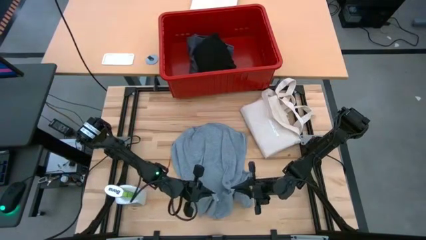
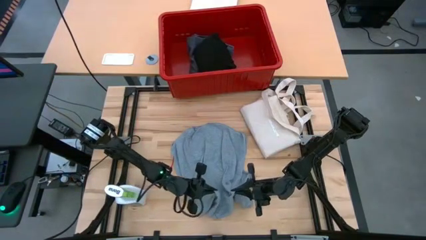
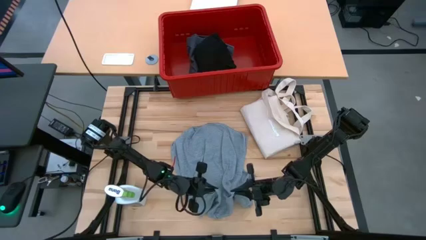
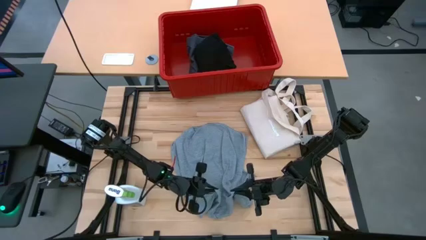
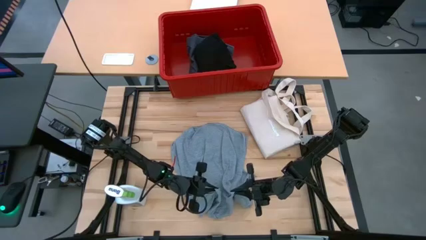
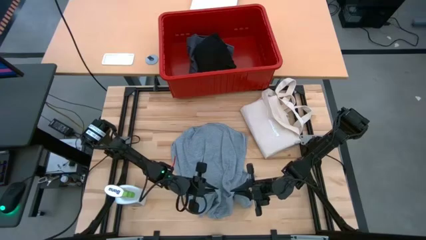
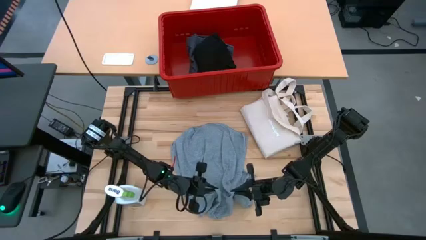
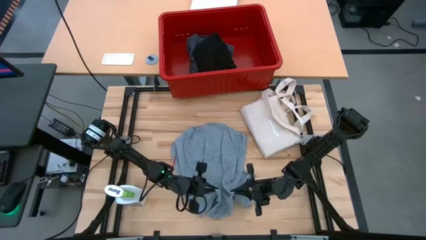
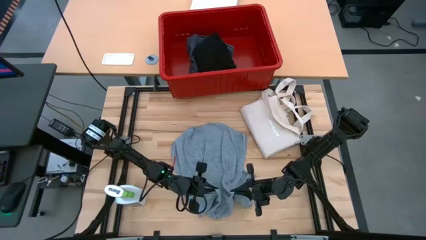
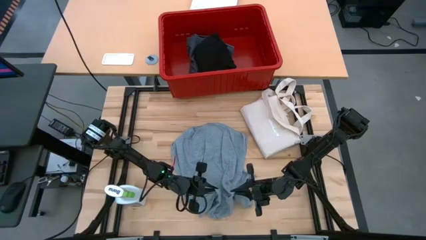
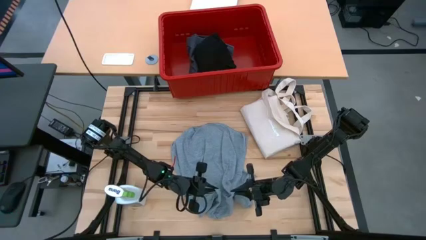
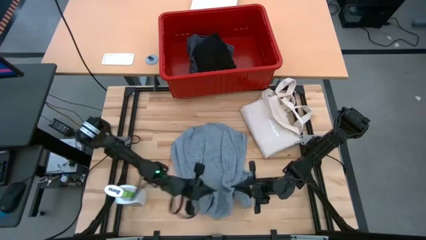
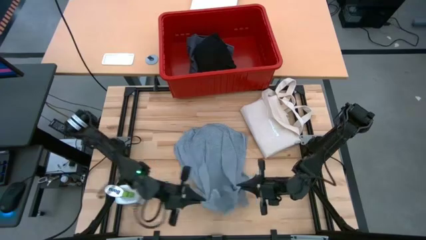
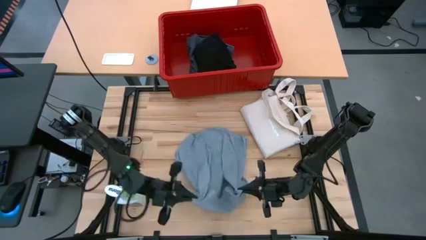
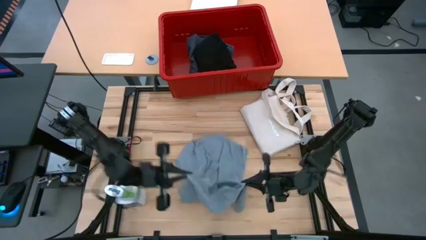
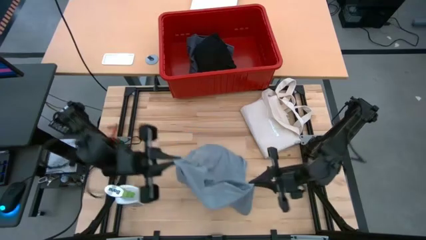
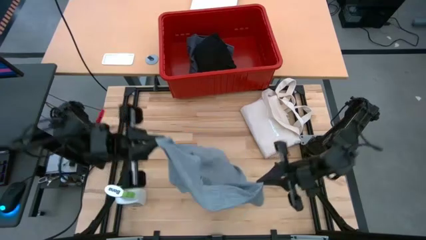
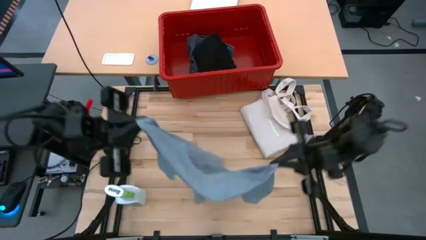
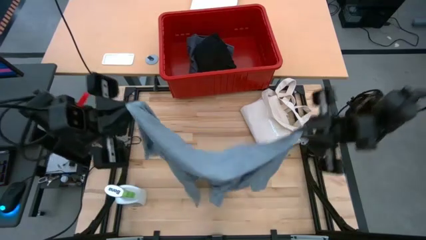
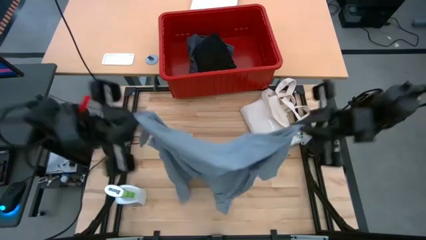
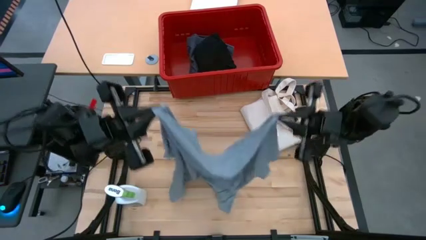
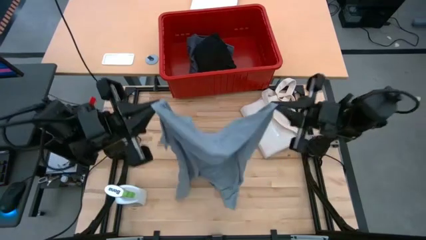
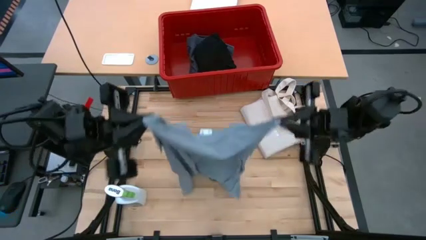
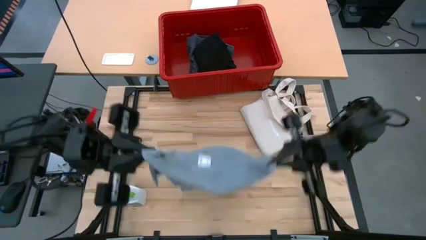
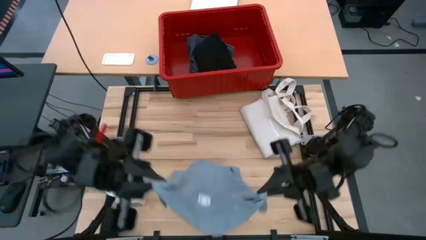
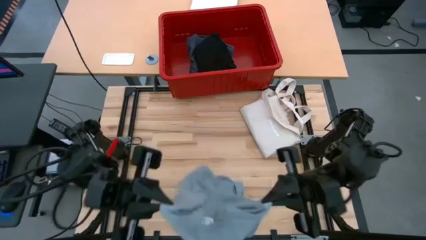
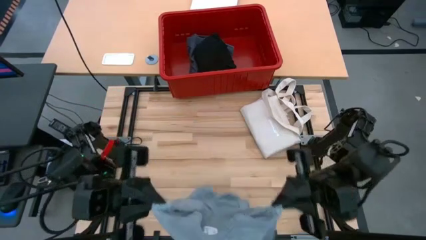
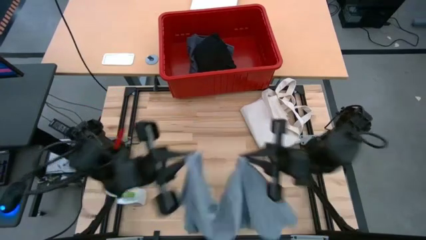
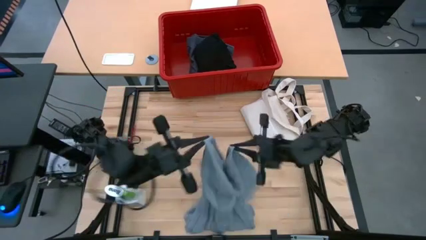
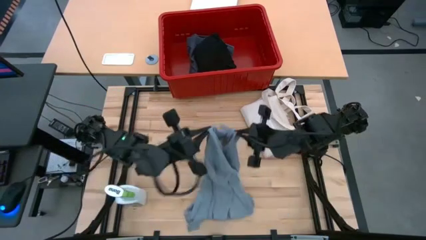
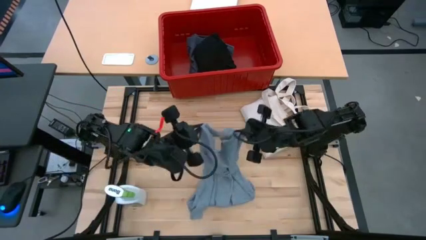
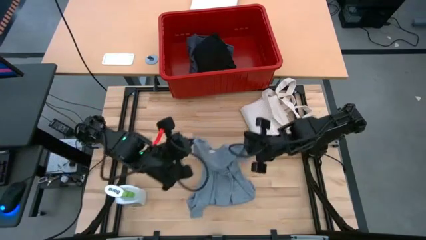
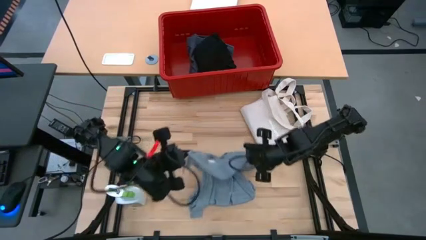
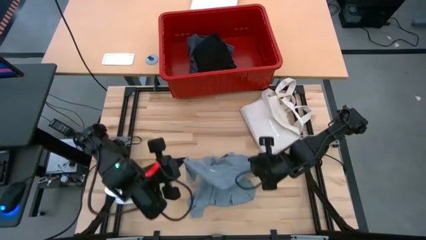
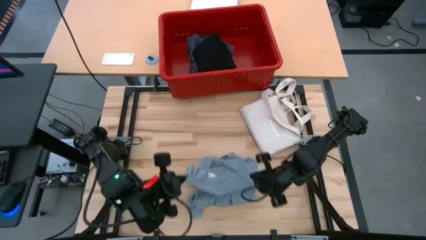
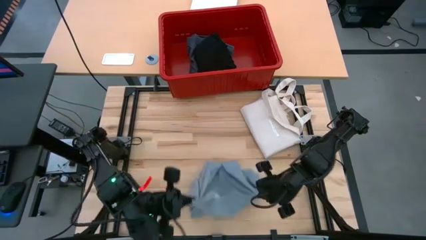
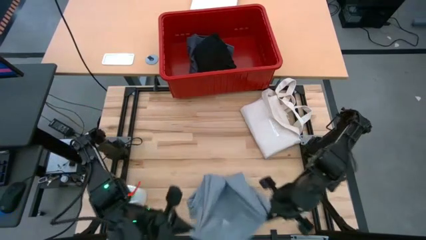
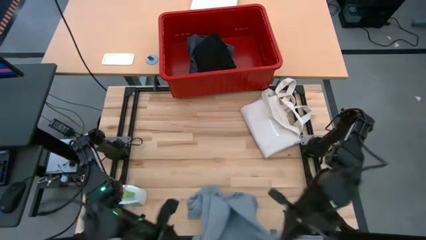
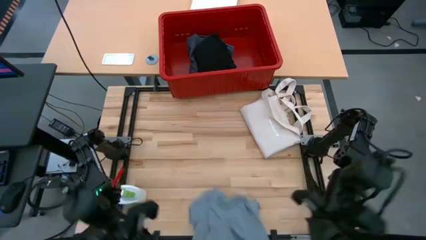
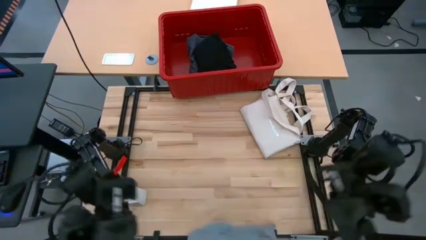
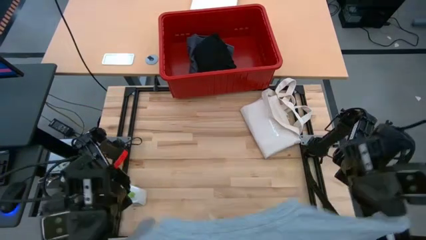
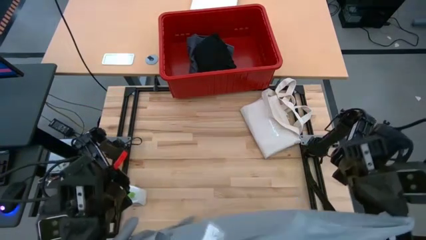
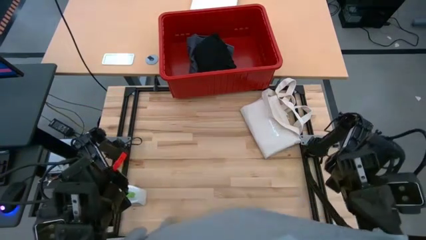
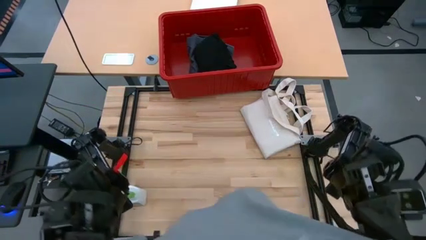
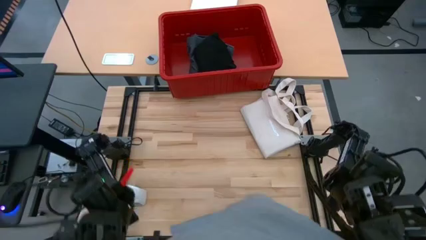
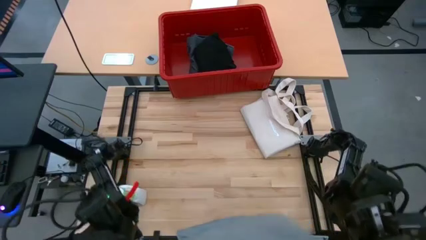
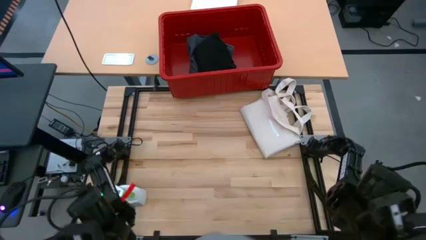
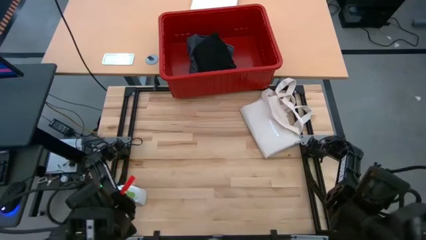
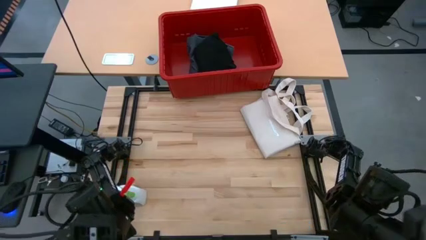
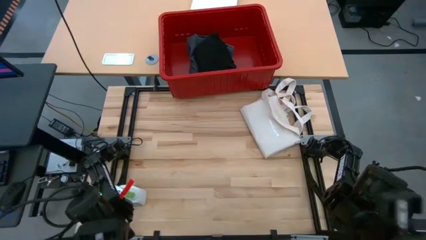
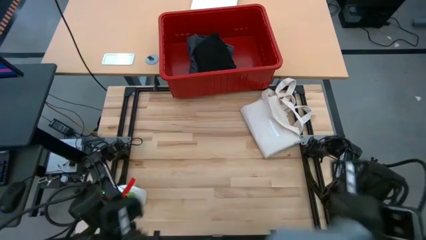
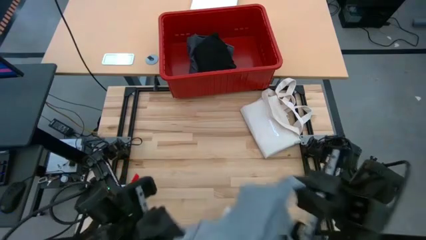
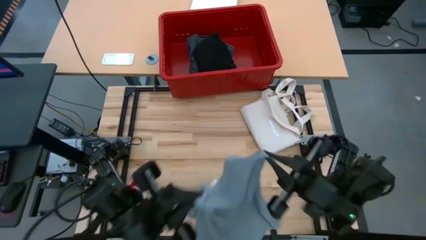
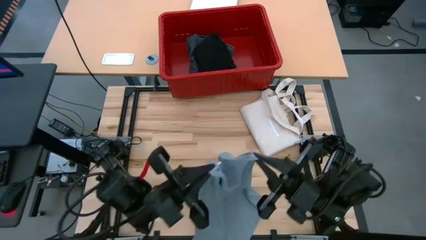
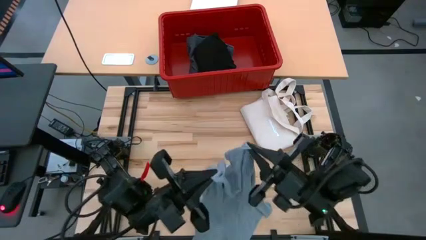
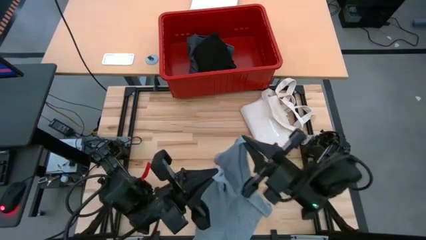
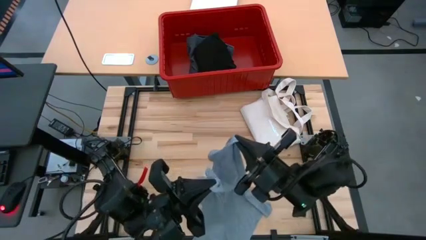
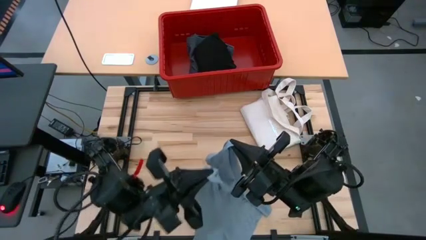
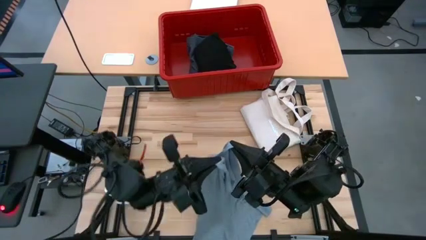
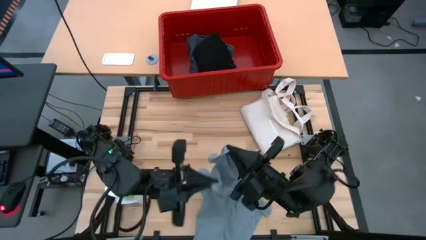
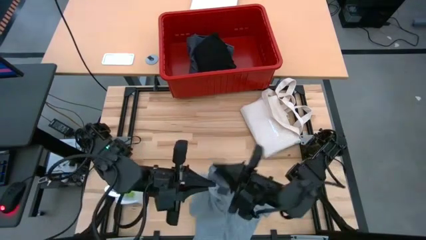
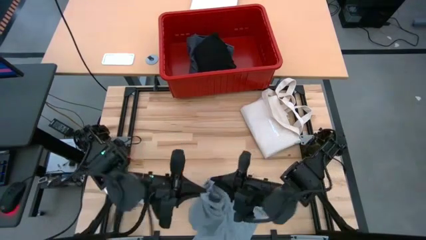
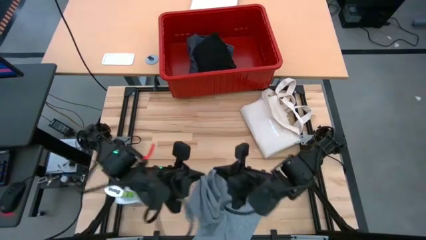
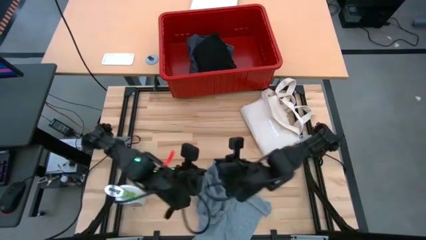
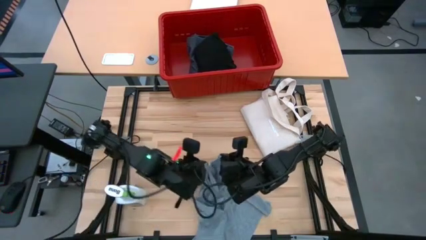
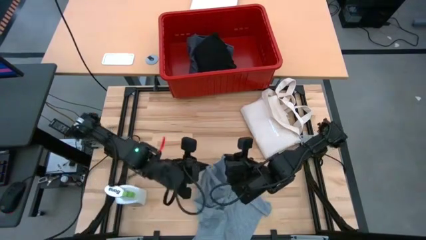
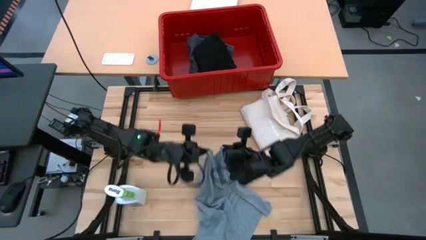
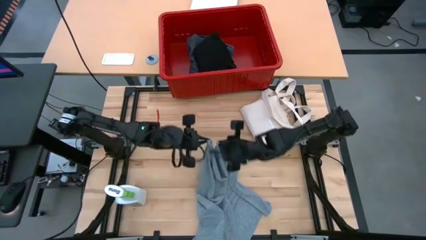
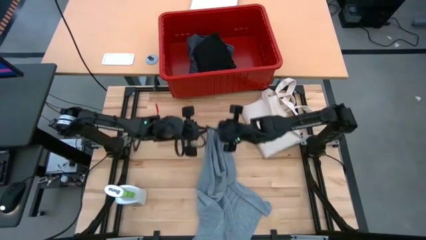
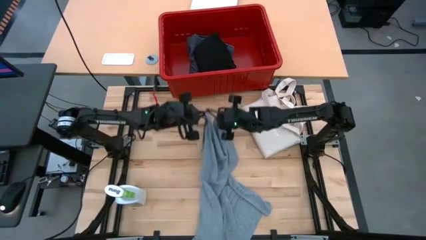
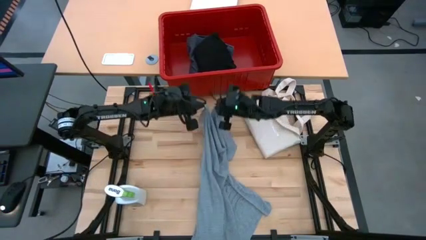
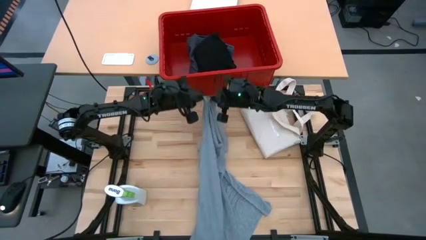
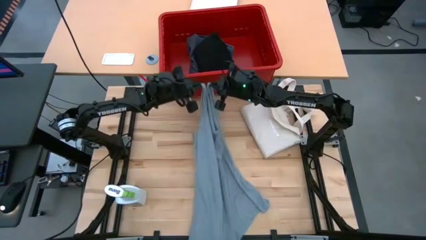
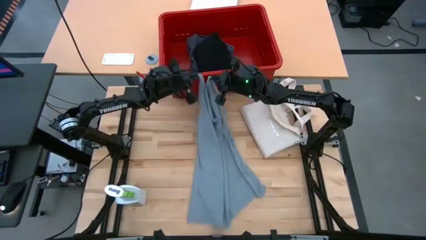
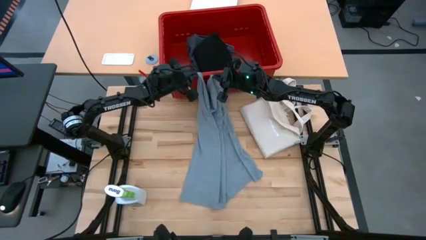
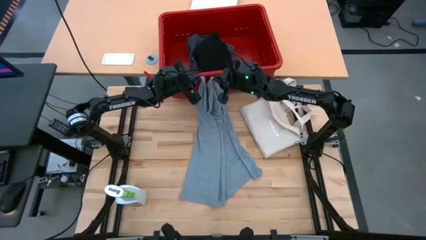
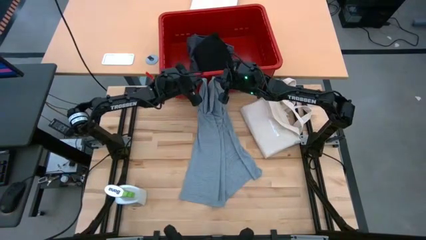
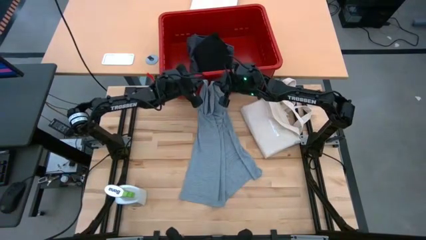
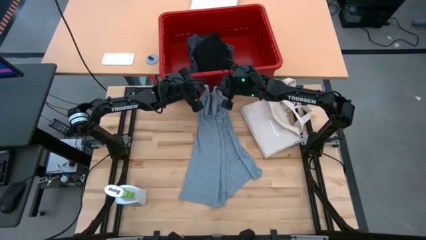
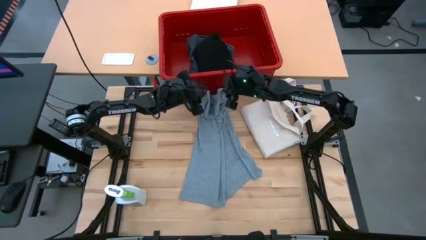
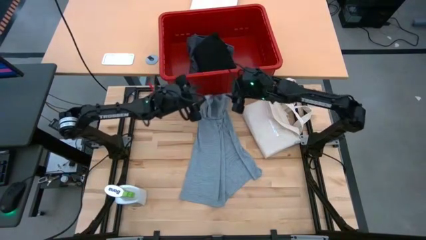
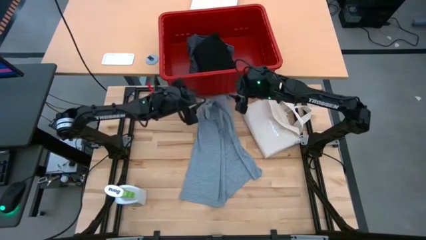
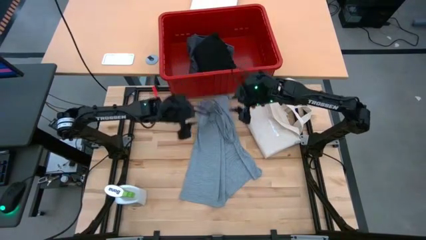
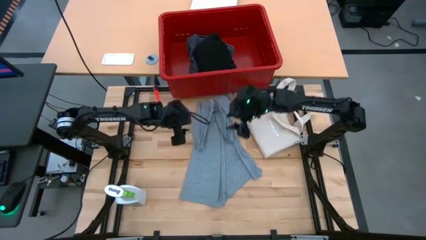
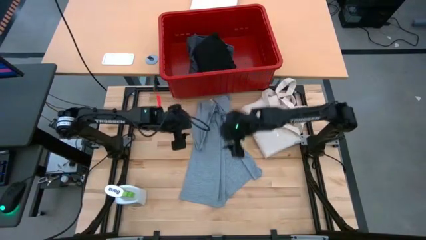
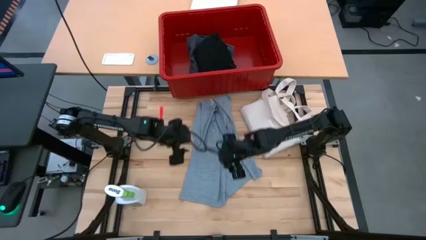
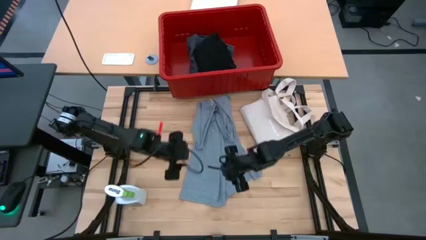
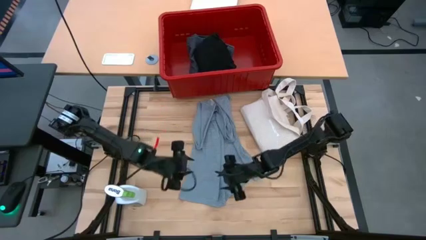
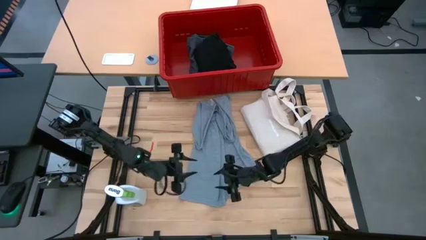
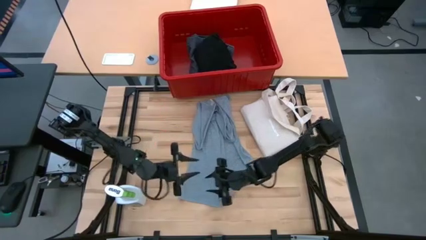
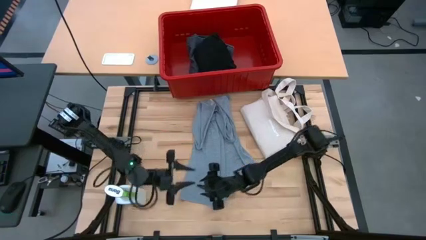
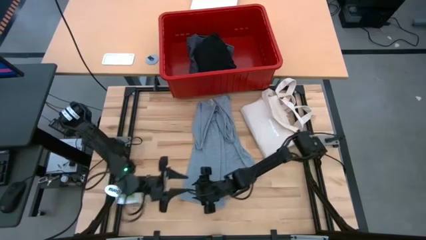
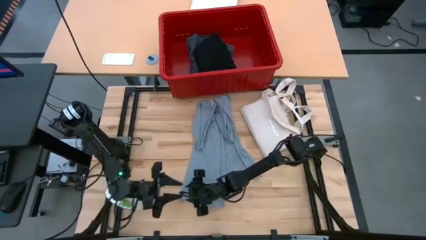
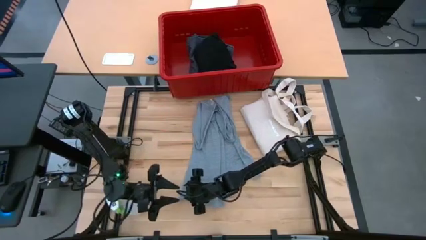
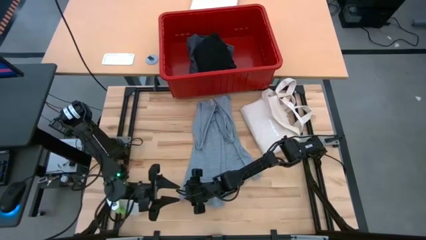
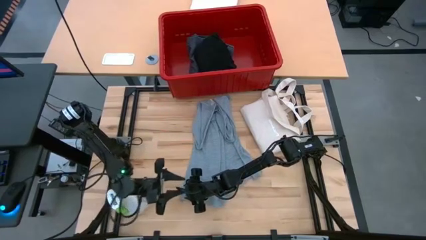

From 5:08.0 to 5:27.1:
Task: Fold Laundry from Bin
Fold the gray shirt
